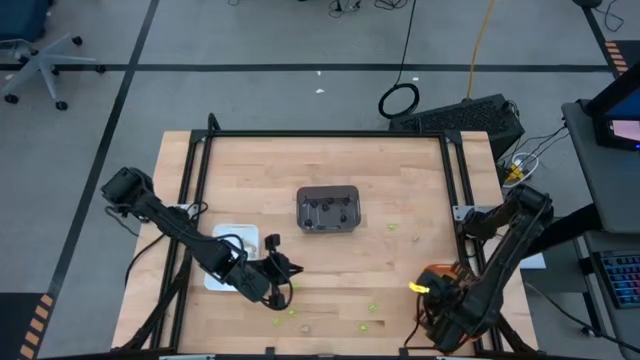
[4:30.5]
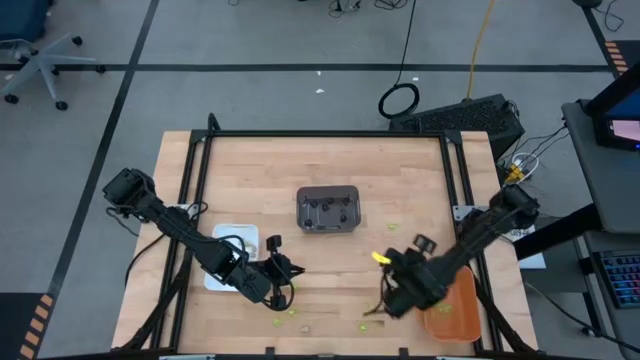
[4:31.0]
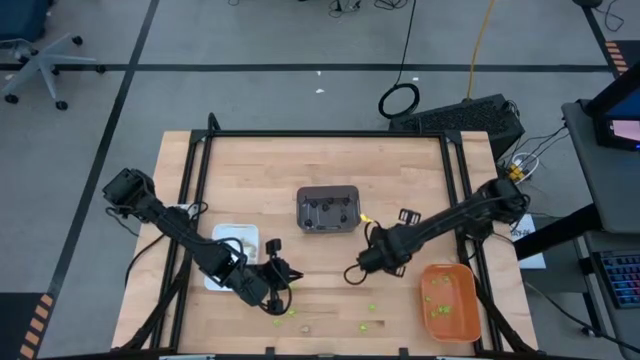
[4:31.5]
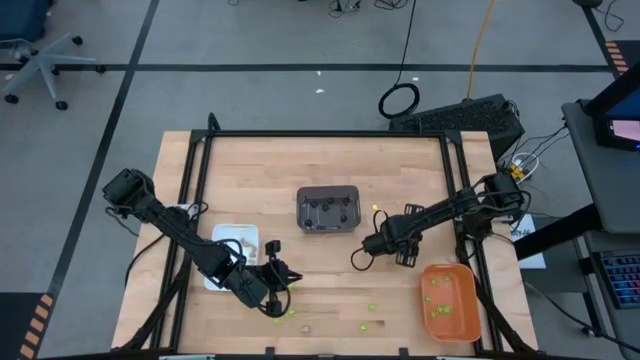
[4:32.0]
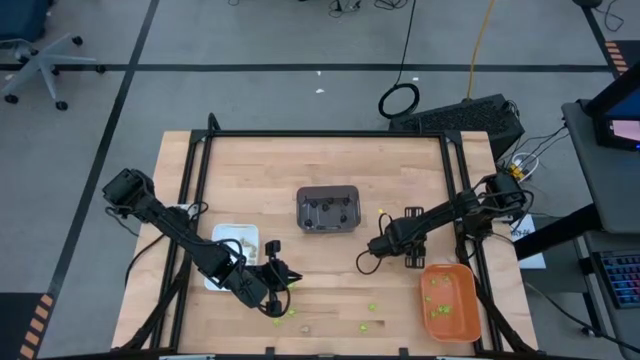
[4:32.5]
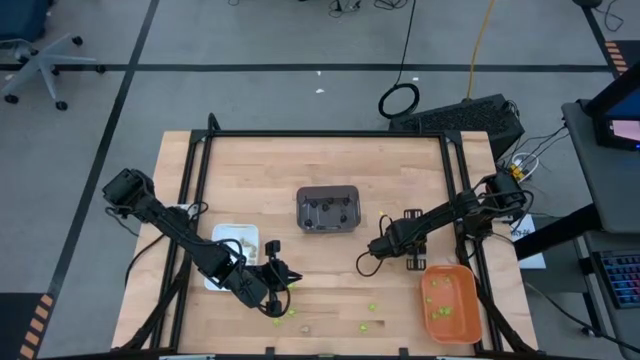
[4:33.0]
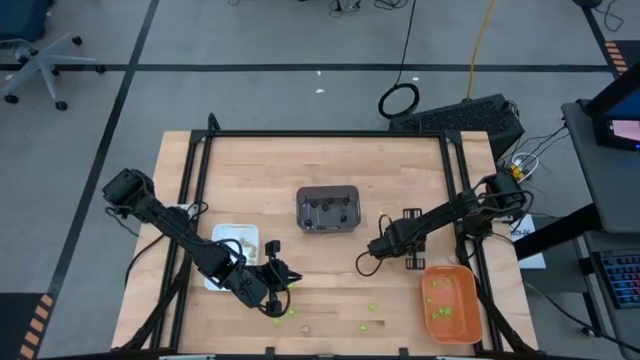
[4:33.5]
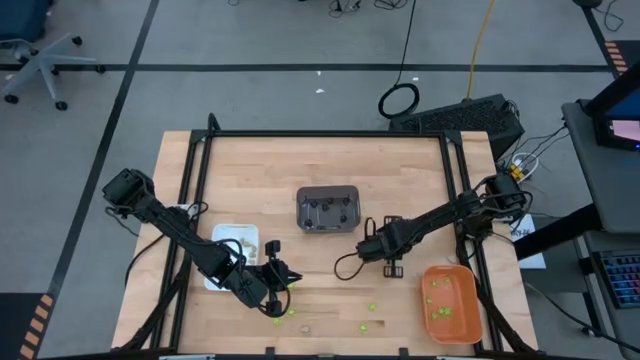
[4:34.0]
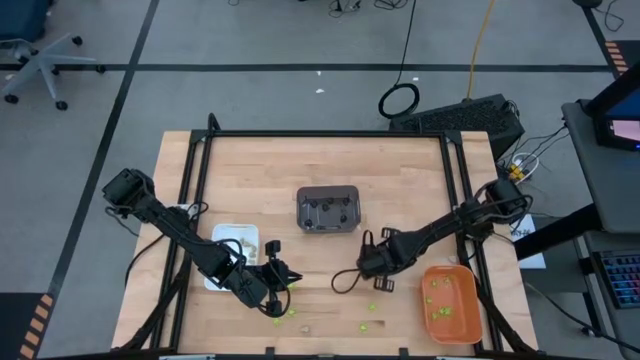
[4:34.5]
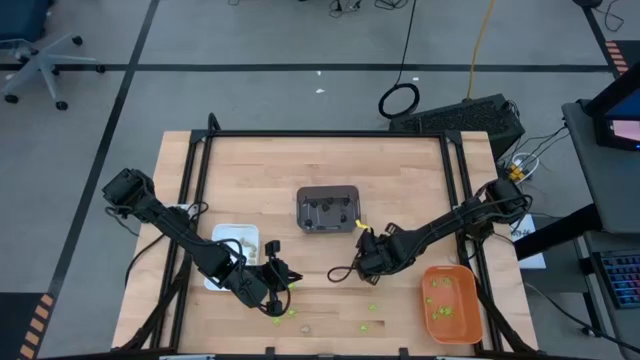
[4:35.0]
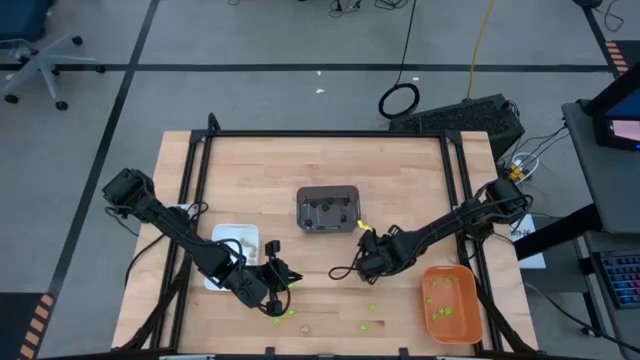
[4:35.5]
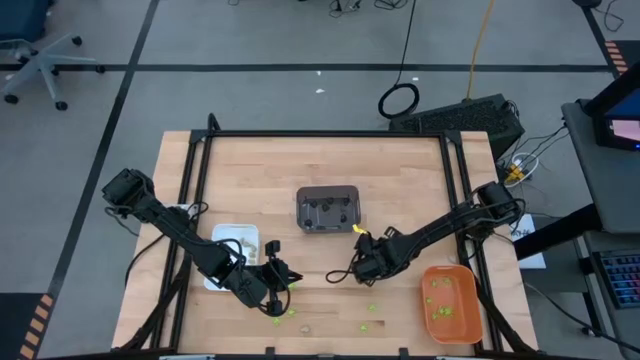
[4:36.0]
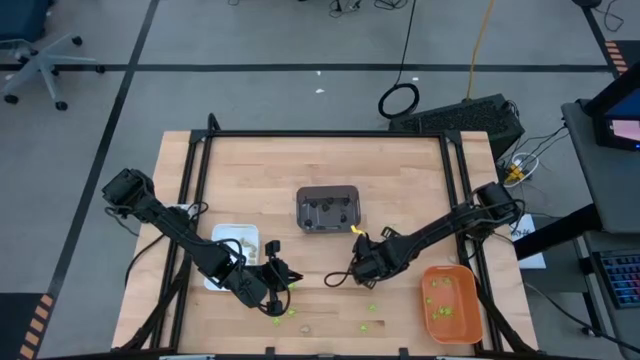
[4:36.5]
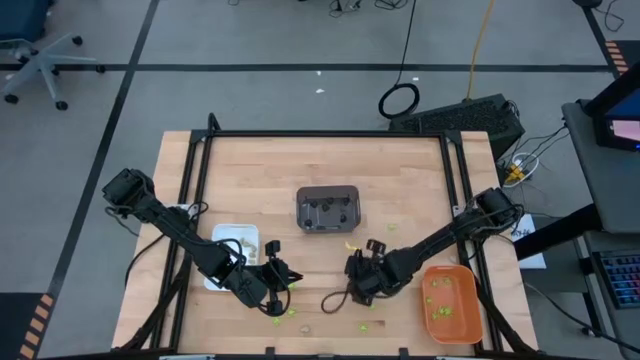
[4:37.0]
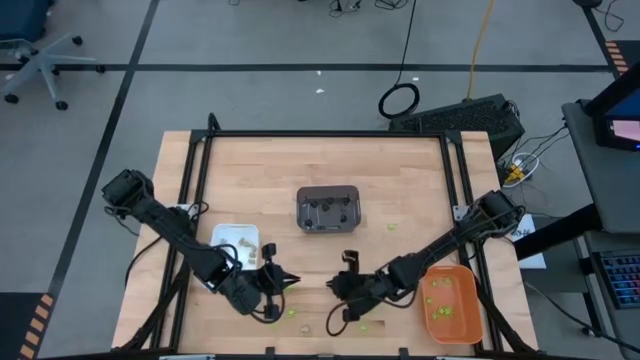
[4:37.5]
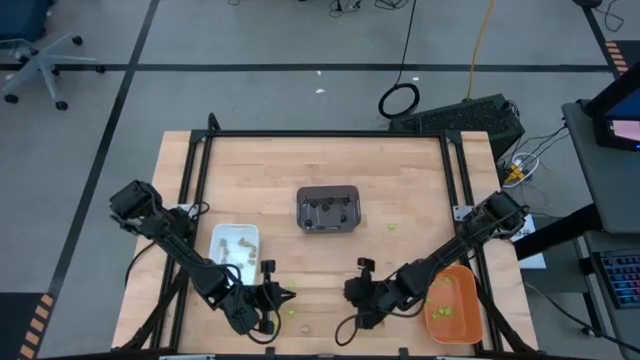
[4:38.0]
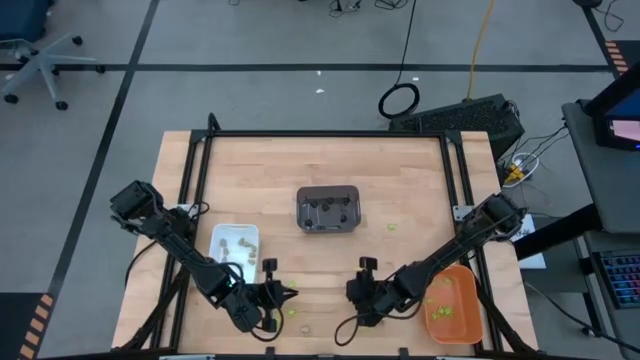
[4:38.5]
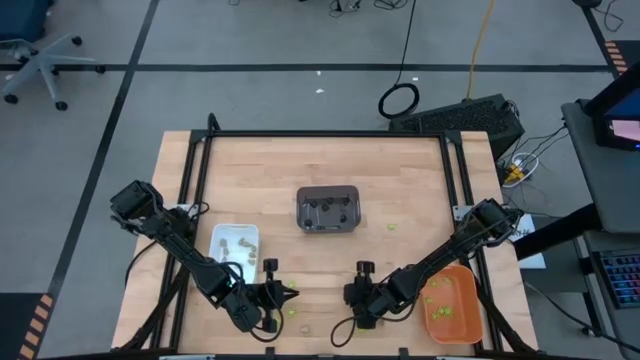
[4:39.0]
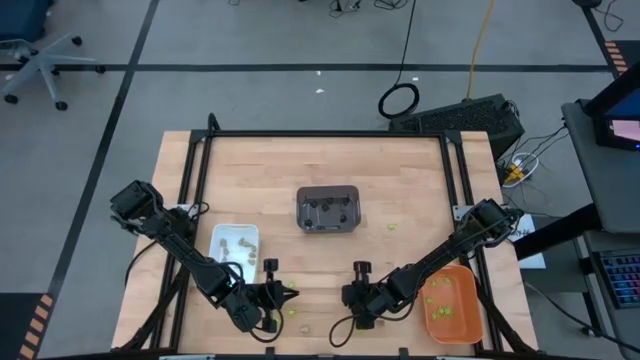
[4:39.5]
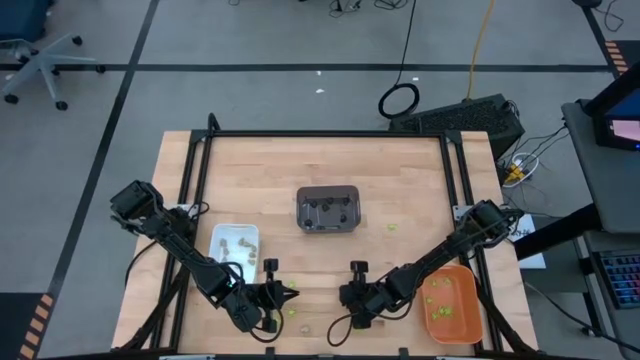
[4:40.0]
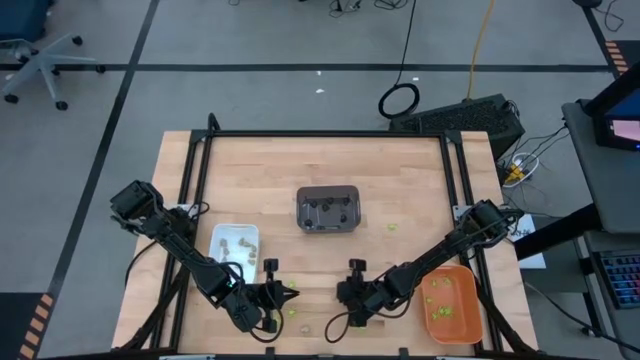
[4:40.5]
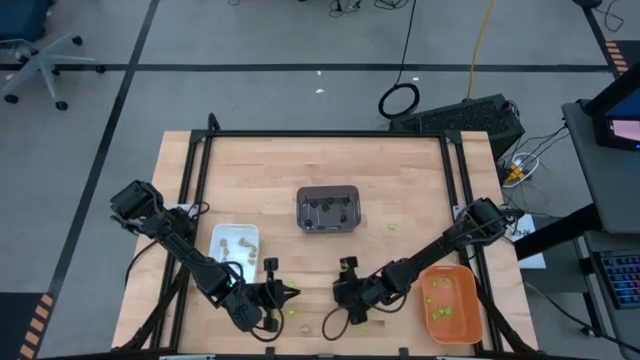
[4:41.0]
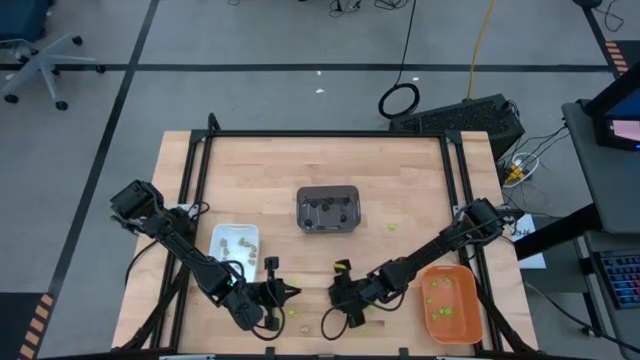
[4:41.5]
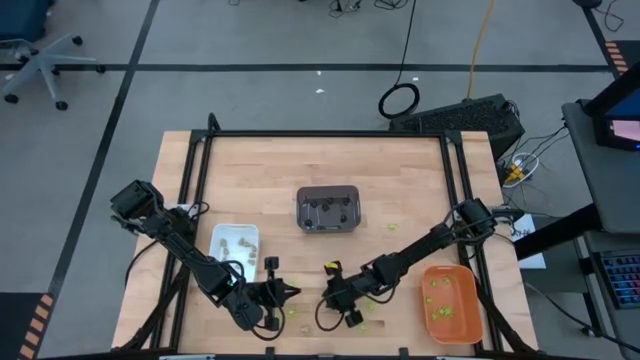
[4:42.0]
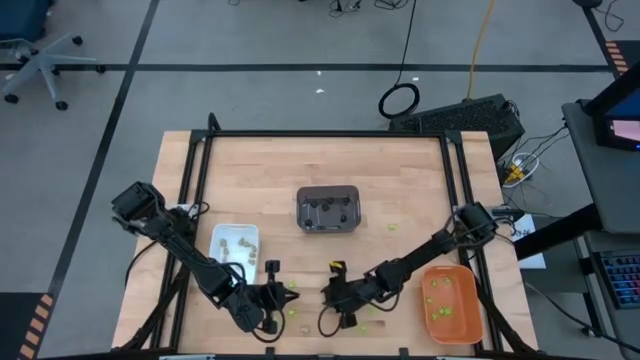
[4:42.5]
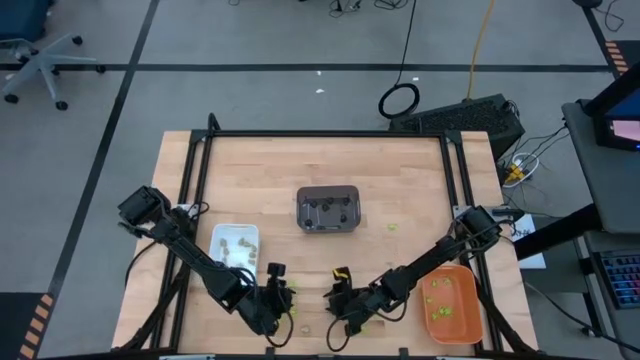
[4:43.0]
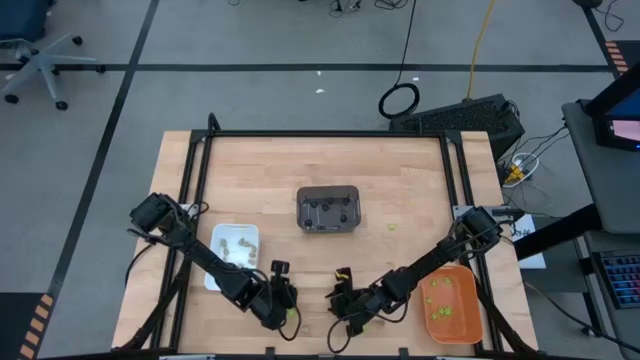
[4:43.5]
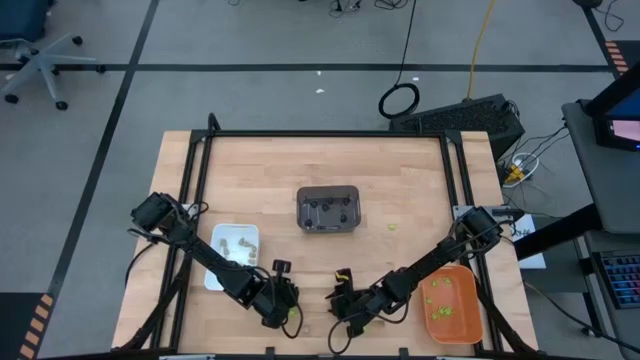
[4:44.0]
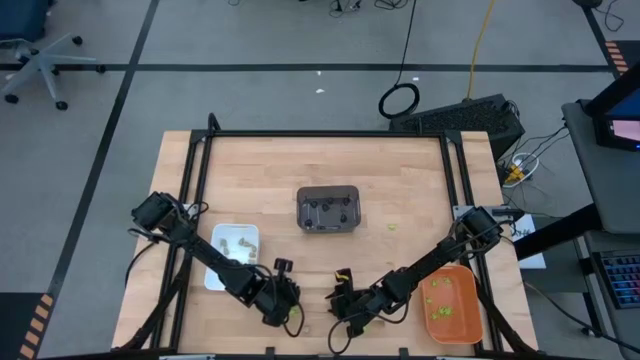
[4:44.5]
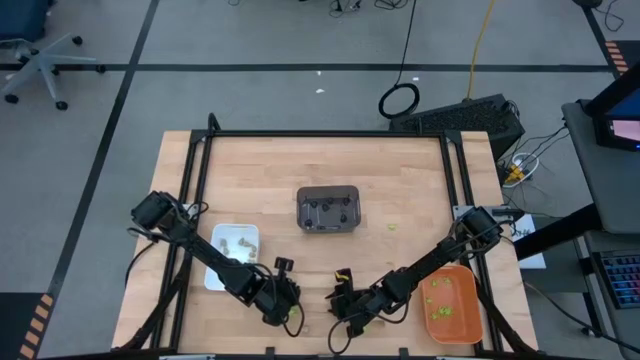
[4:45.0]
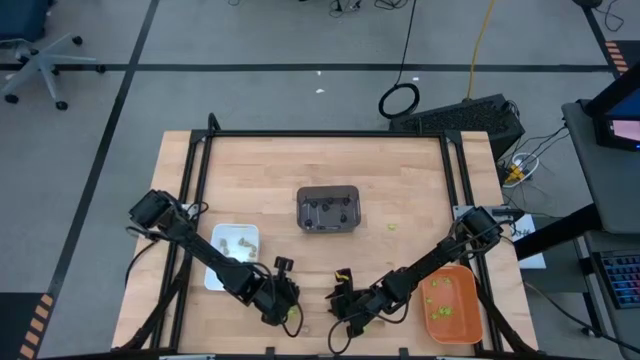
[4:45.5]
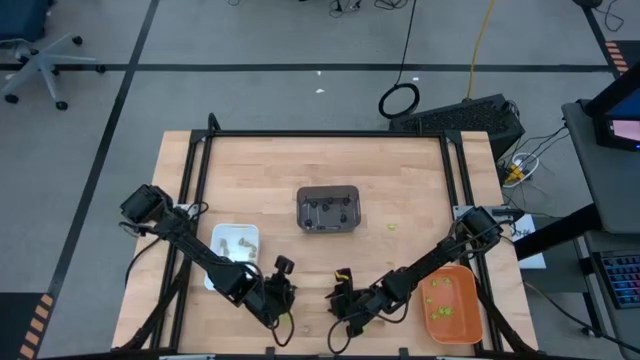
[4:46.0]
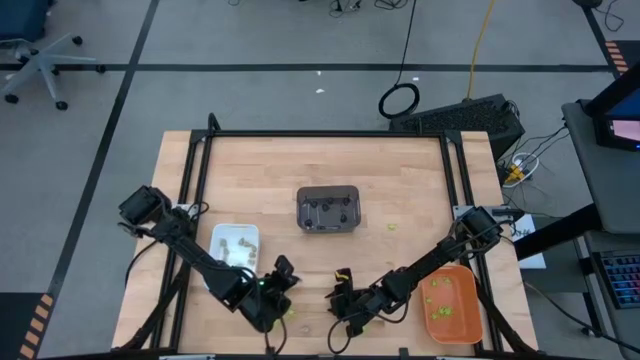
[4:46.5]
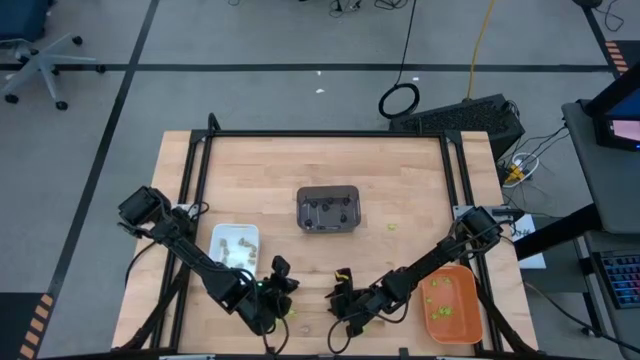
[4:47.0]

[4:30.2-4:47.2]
Task: Sort Halloween decoration
Put the white skull toy into the white bin

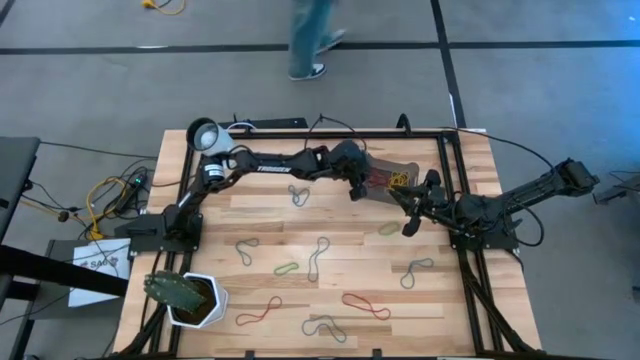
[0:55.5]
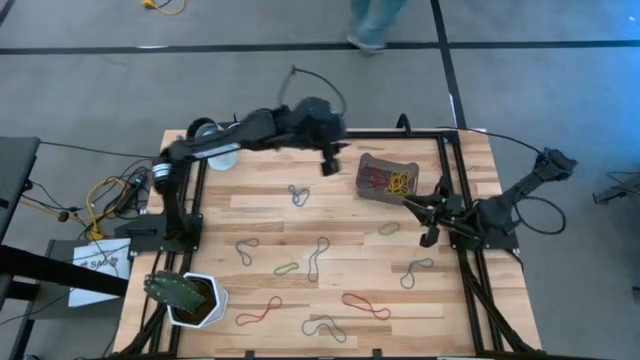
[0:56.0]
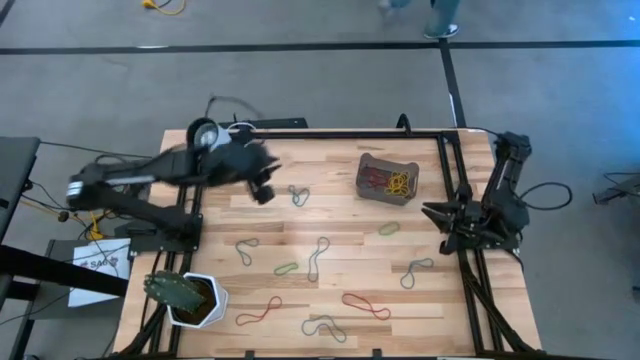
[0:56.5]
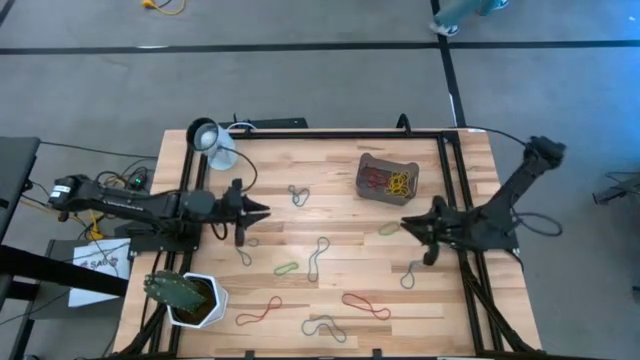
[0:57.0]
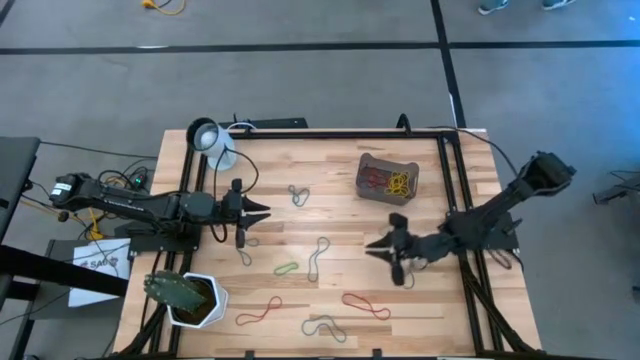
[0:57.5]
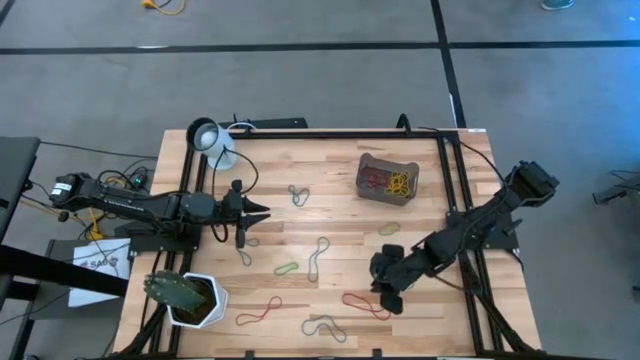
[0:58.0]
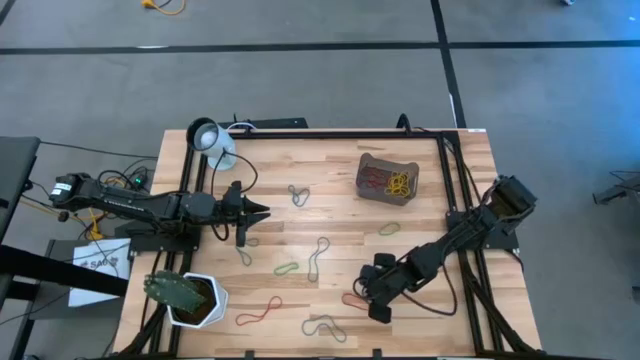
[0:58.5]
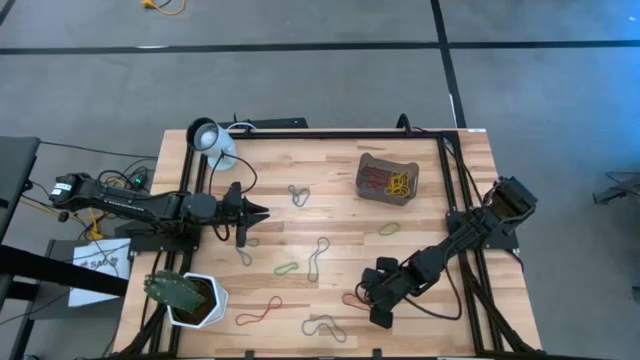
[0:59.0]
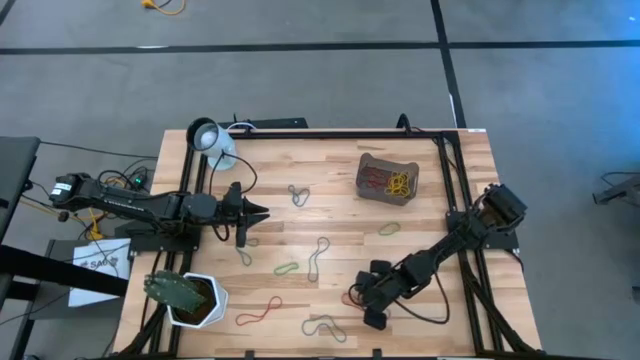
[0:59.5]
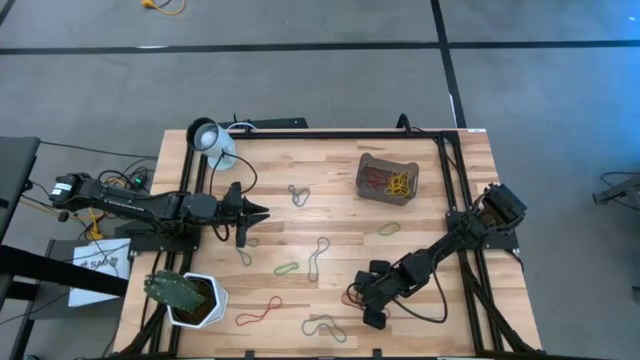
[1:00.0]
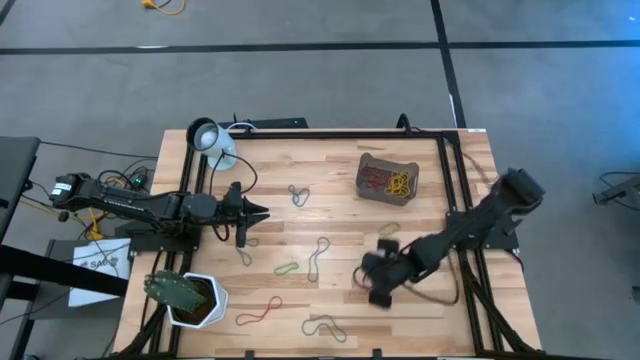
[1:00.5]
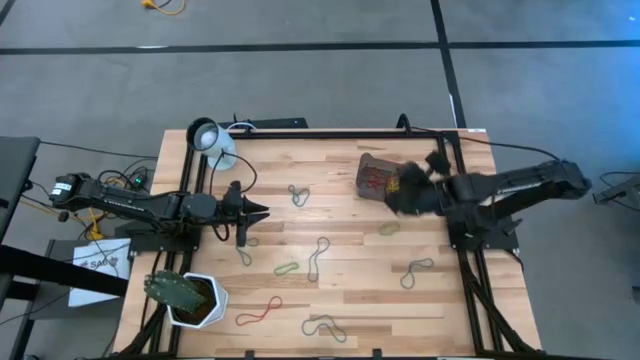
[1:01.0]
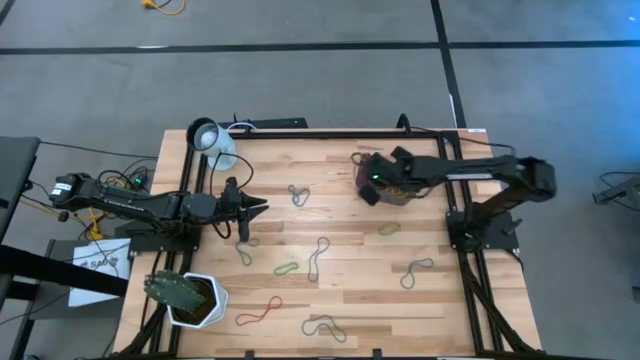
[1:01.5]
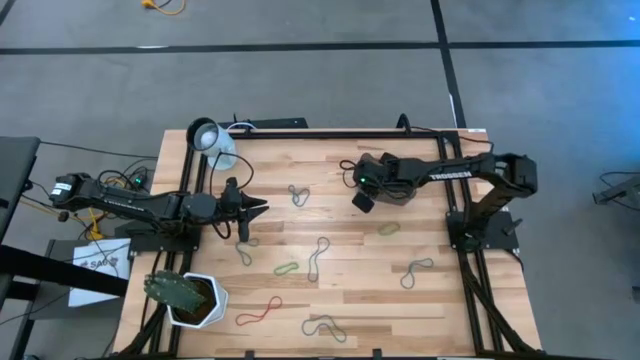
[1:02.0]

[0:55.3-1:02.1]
Task: Pick and place rubber bands into bin
Put the red rubber band into the black container
